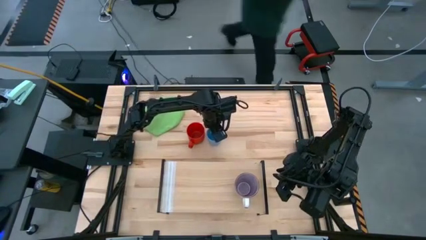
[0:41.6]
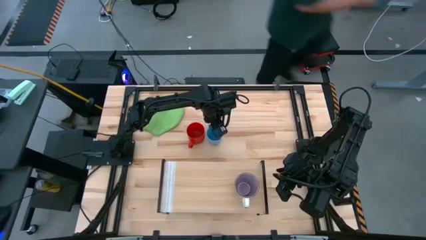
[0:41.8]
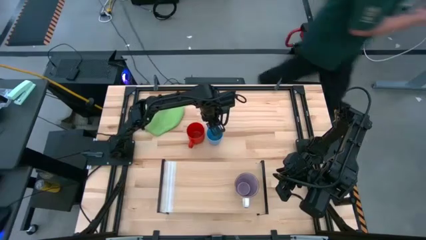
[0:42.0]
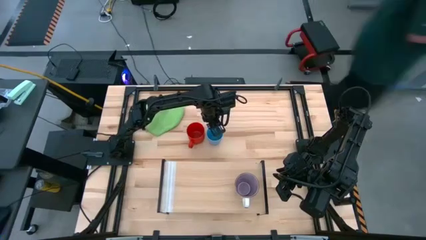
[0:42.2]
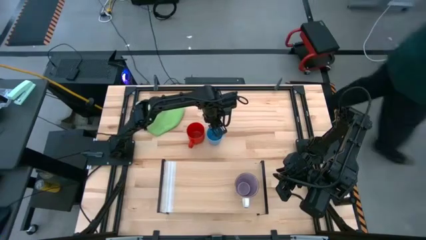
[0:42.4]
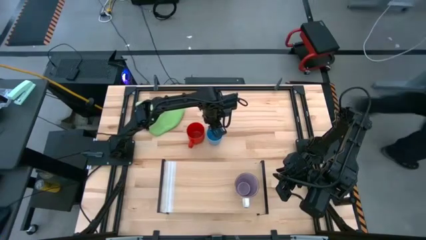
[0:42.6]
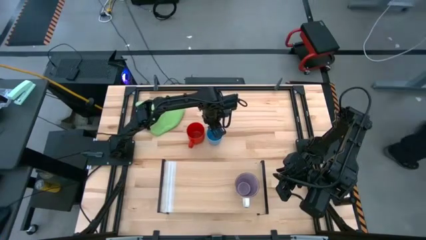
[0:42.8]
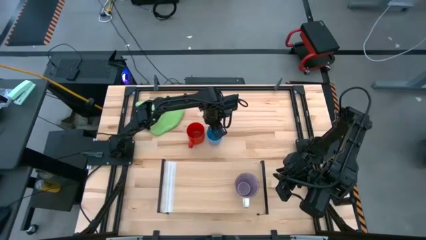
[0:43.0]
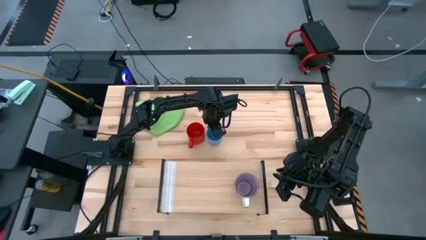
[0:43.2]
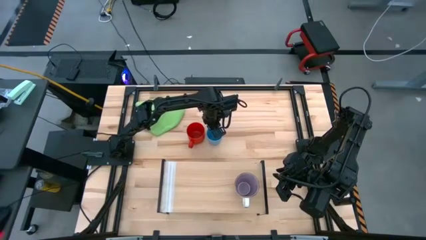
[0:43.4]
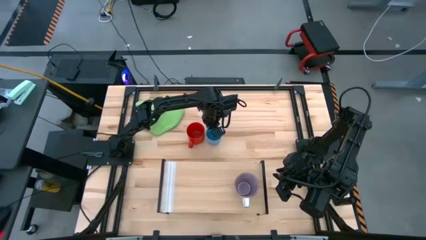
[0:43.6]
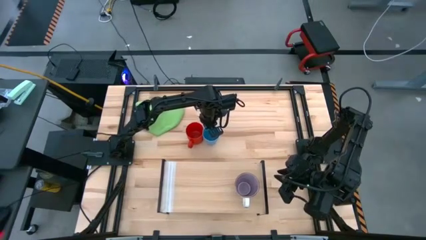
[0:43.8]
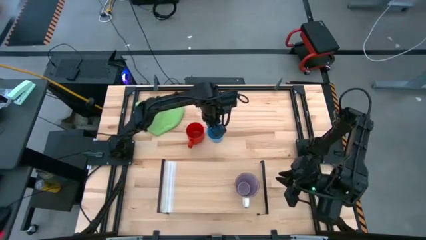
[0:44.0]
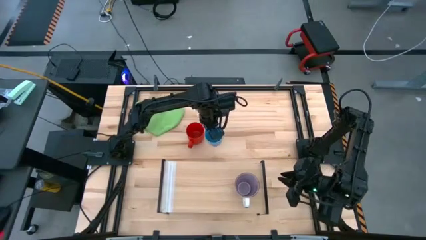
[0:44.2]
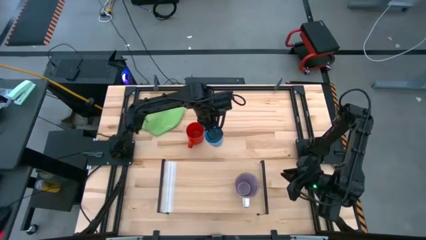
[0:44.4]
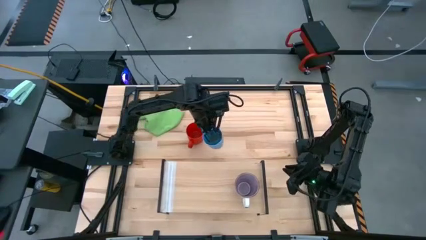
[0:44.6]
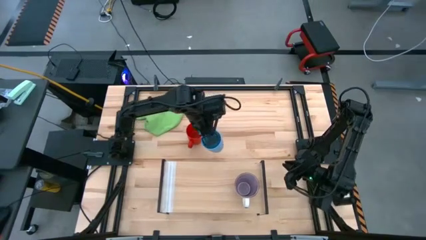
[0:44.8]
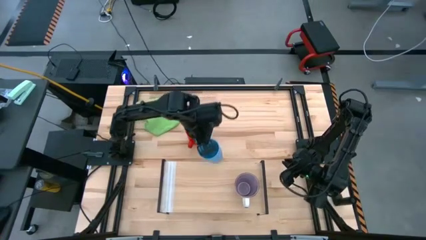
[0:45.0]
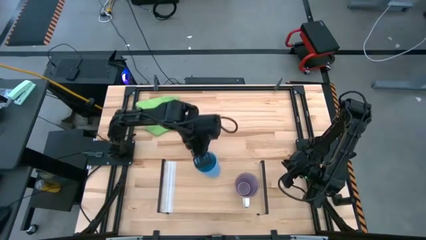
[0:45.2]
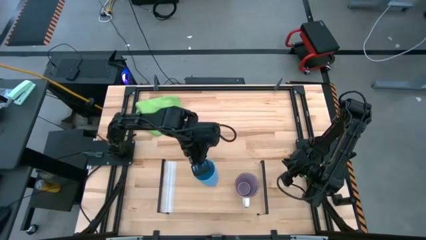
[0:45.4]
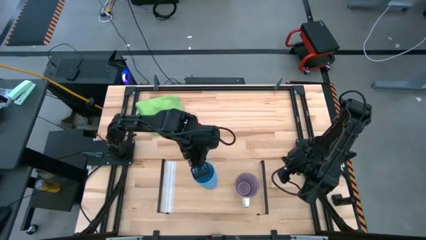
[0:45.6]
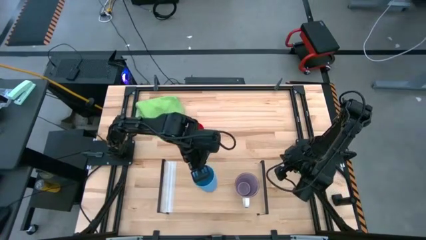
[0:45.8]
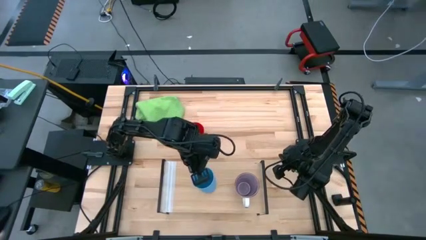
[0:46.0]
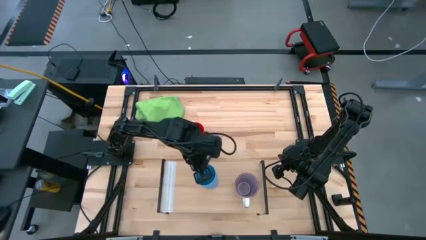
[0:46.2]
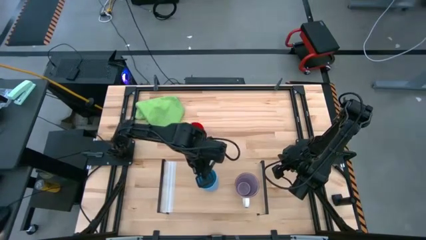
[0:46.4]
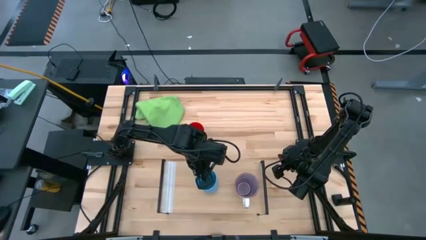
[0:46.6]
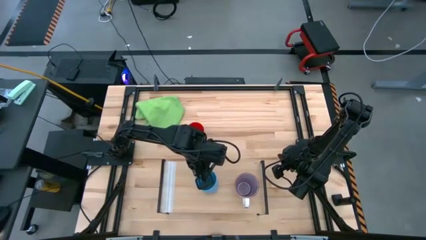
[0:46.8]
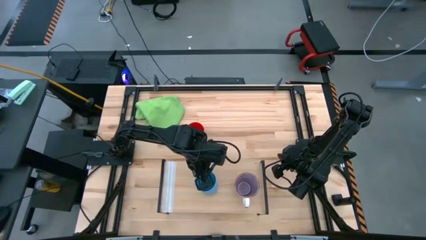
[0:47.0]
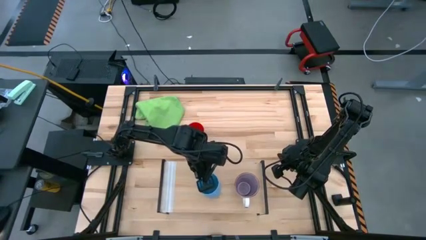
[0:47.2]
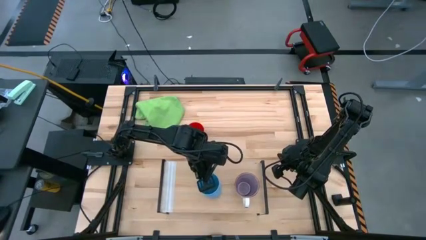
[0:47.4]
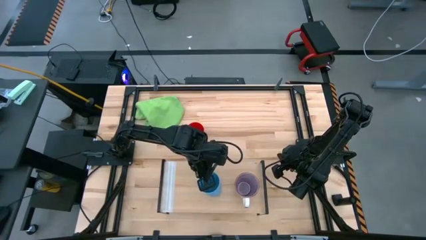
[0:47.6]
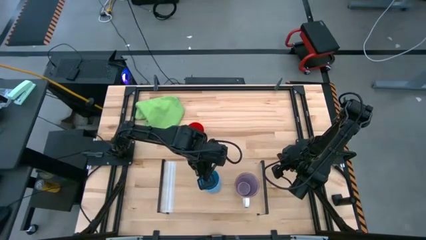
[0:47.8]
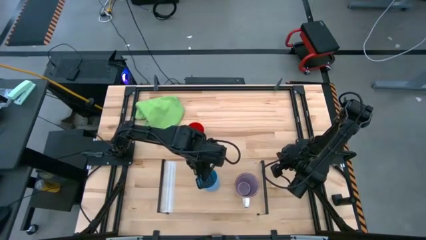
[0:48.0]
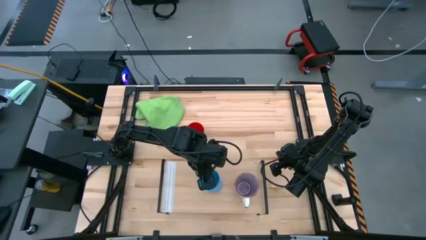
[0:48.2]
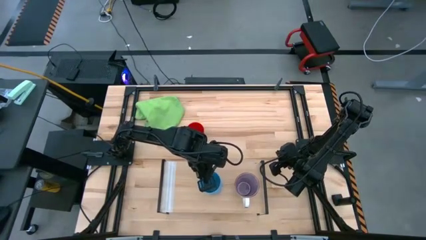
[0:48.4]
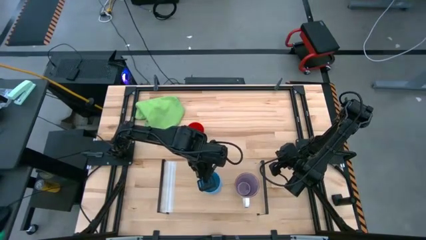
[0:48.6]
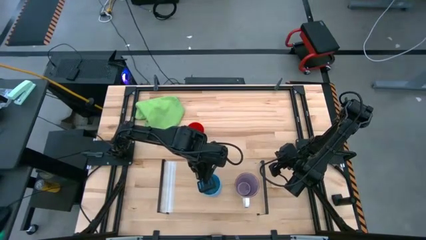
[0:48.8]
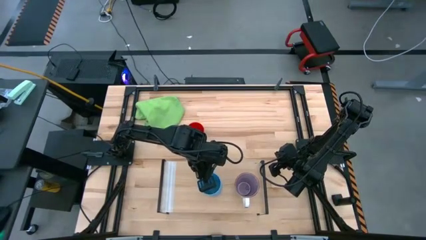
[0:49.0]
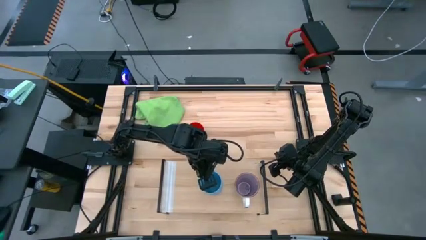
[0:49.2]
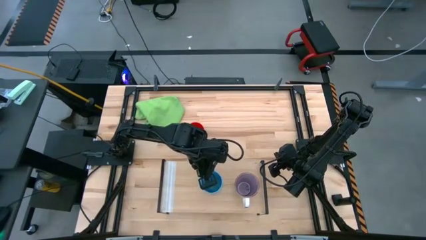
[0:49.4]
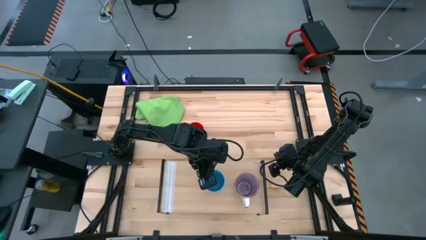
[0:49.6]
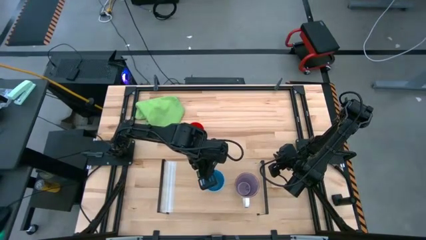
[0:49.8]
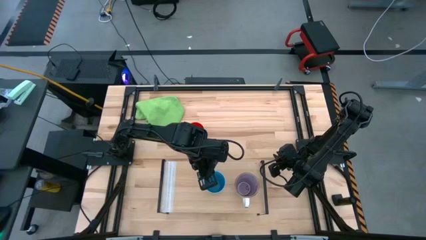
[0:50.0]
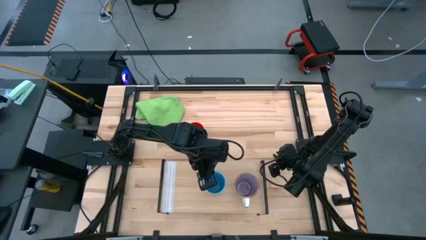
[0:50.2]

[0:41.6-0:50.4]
Task: Stack small to large cups/mugs on shelf
Put the blue cup on the shelf

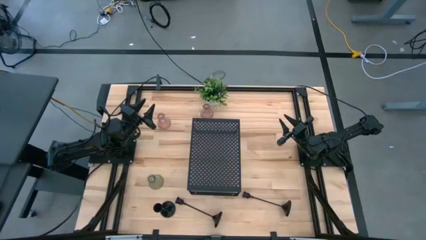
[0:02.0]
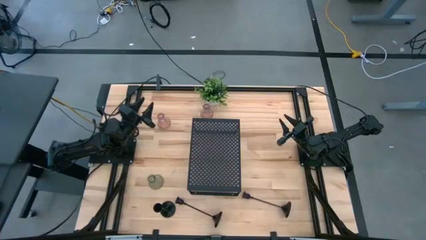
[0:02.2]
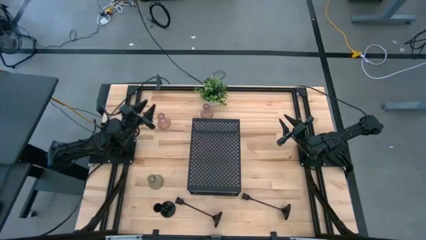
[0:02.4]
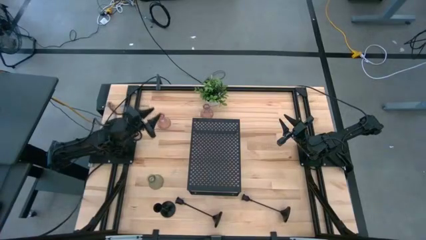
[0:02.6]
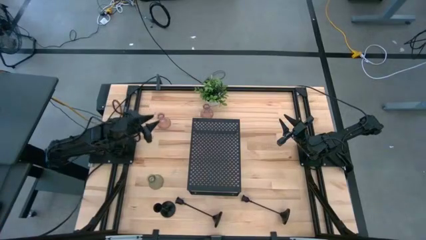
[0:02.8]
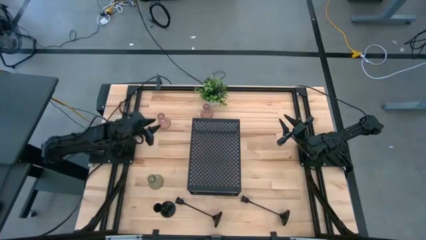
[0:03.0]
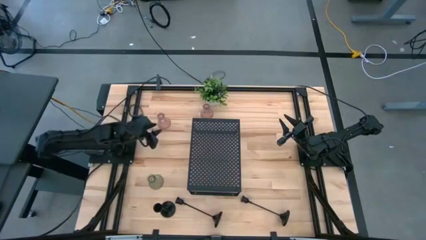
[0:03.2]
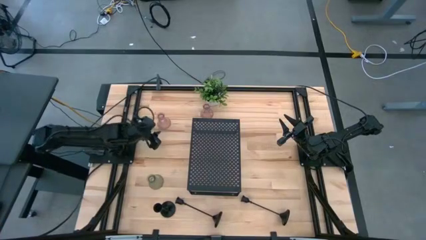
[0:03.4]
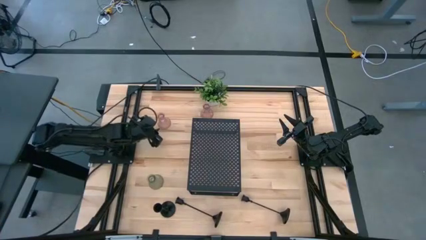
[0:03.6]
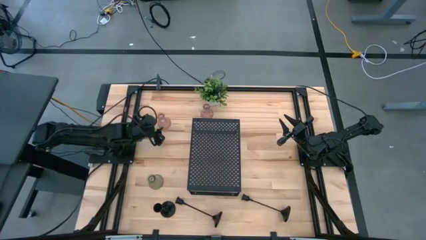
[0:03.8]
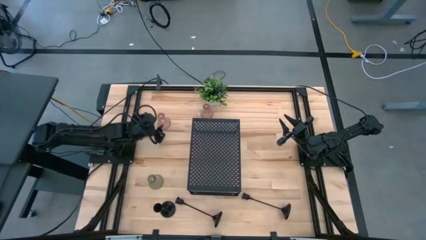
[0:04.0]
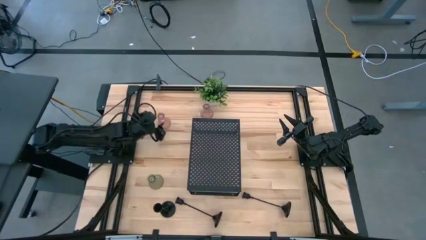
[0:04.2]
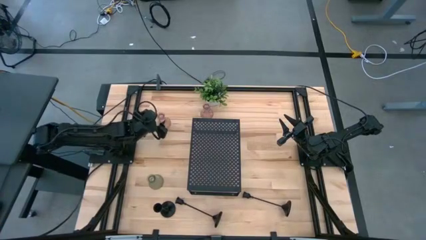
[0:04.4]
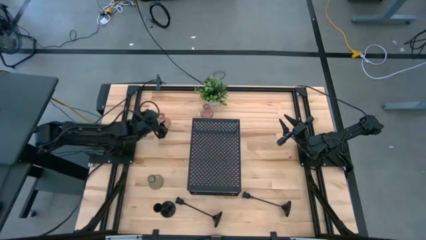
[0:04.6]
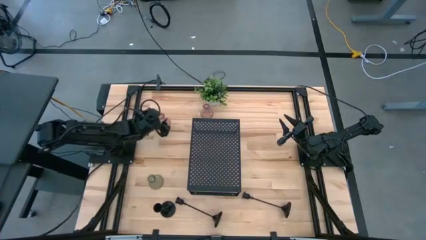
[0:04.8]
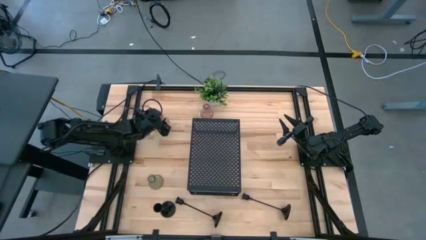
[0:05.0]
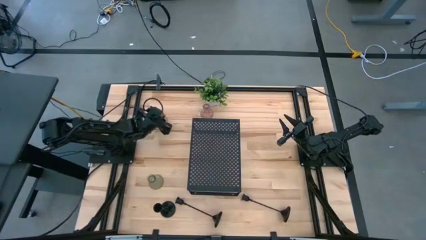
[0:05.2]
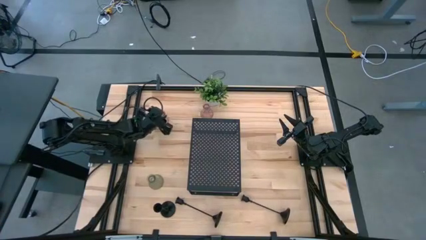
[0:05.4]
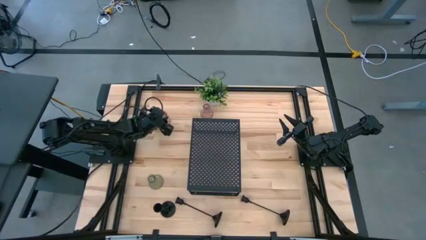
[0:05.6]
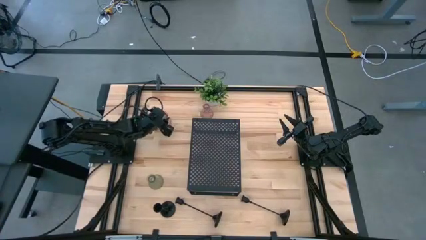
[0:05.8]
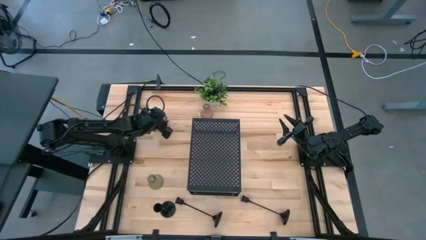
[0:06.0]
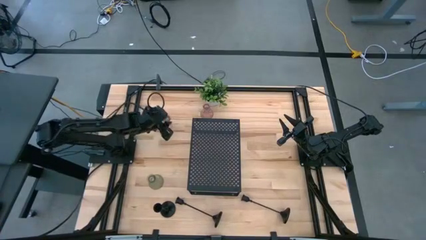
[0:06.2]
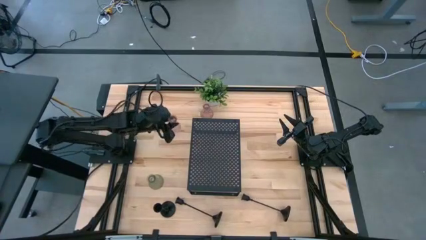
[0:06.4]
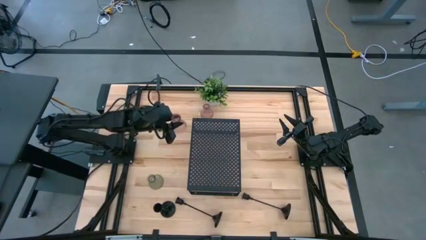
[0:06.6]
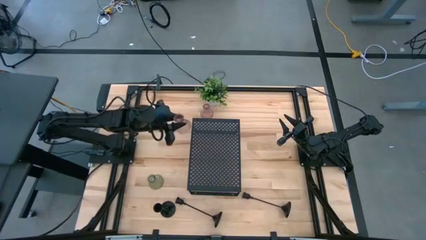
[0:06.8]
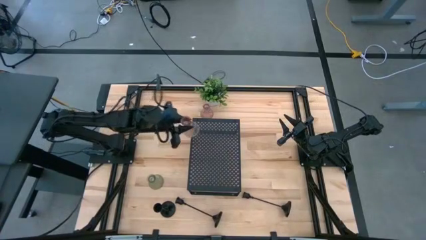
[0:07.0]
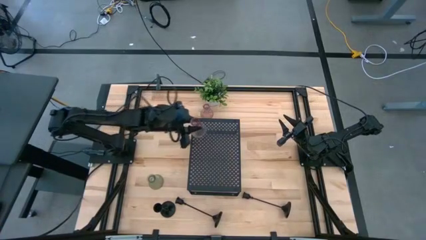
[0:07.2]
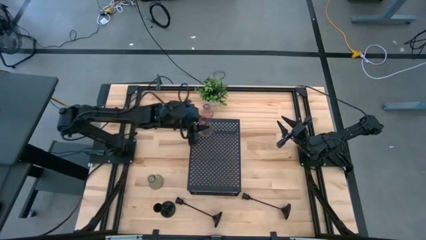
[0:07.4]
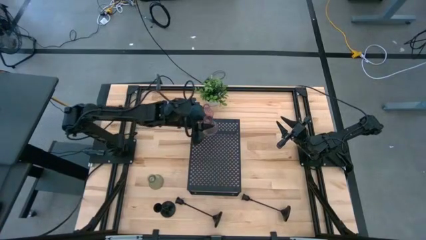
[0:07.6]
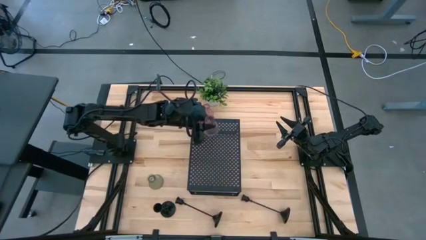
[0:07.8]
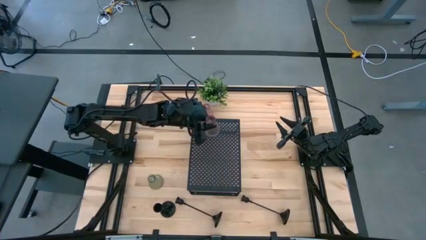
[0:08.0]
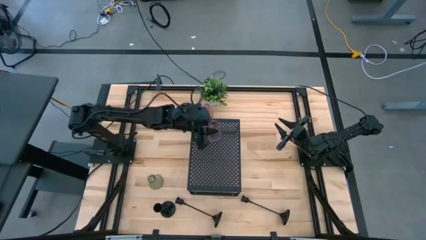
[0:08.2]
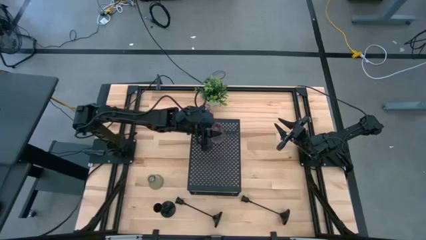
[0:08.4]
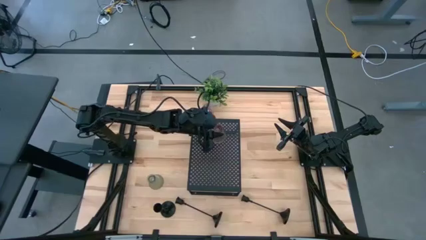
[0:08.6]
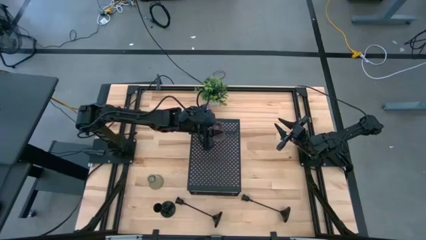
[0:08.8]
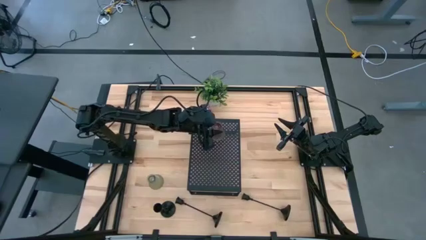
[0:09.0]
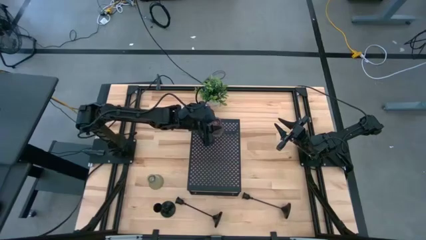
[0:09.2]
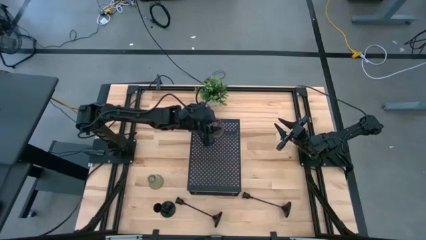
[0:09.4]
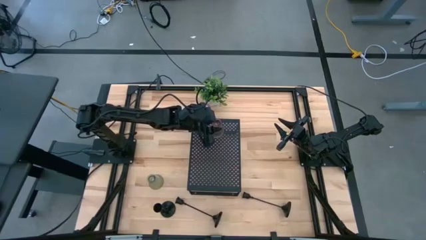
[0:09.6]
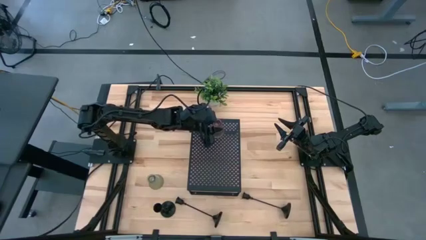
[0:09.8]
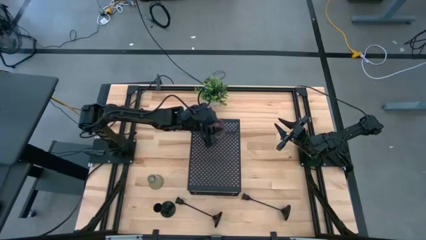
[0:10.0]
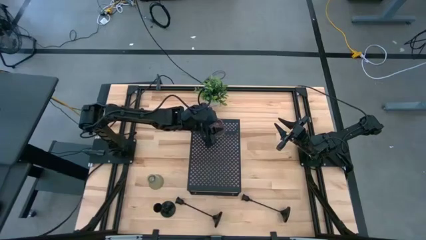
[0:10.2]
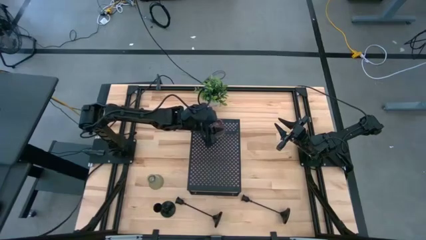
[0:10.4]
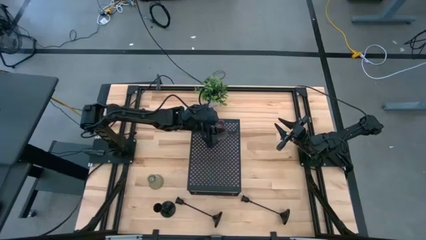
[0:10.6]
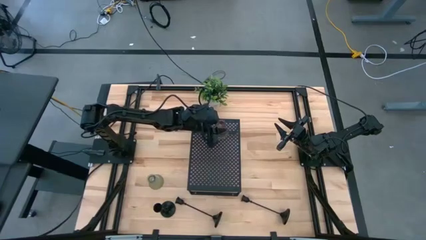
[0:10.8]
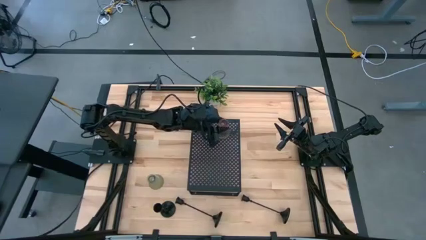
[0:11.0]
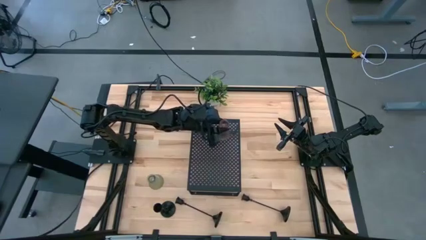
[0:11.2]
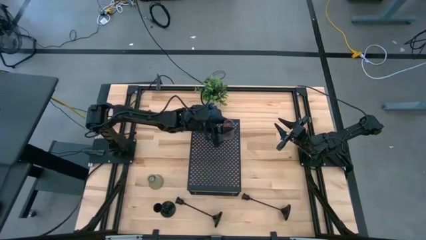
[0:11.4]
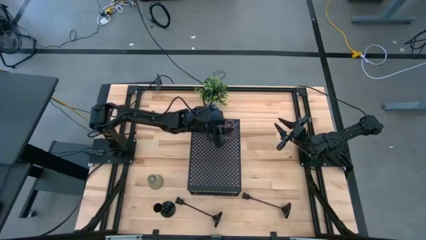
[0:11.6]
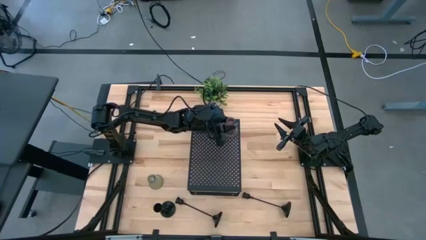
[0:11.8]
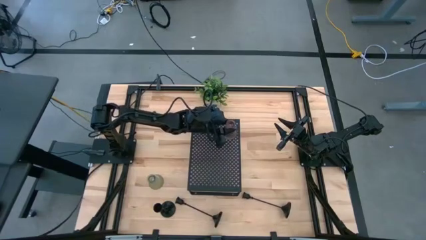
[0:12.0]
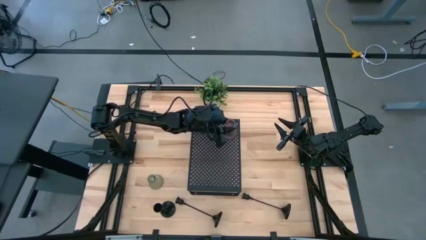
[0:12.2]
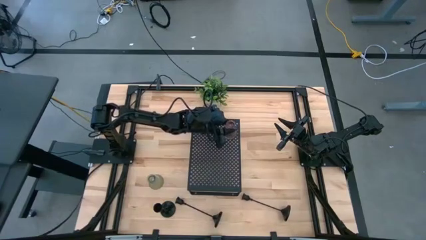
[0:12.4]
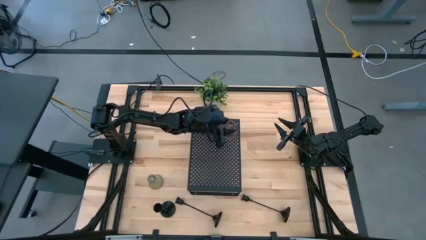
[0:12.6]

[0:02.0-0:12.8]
Task: Pick & Place candle stick holders
Put the left purple glass candle holder on the shelf
